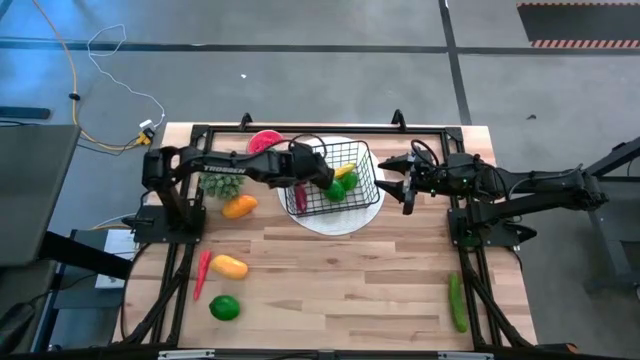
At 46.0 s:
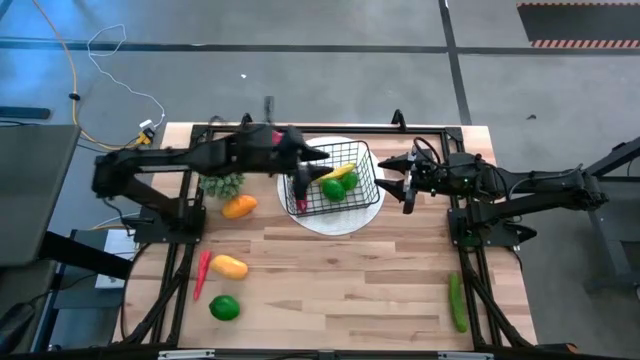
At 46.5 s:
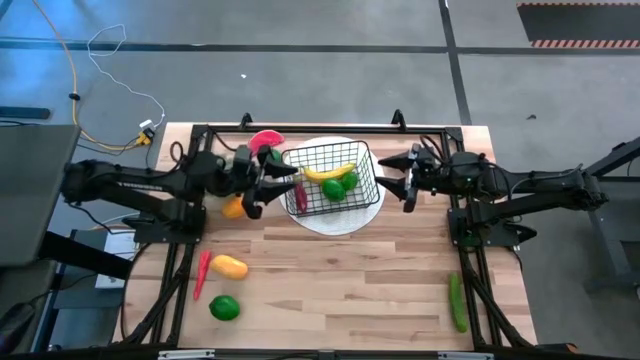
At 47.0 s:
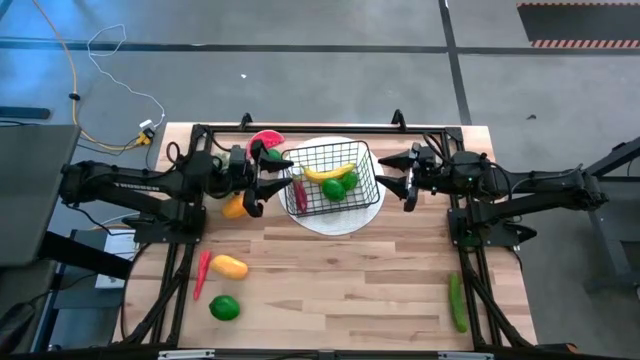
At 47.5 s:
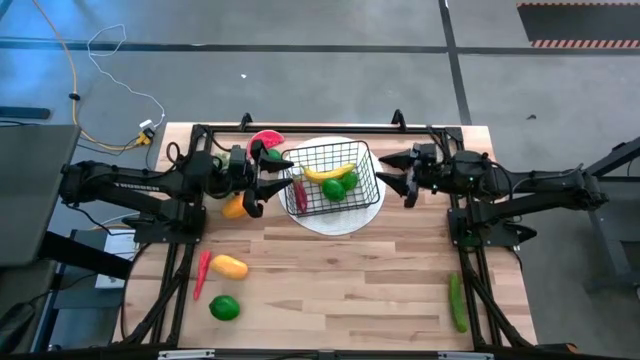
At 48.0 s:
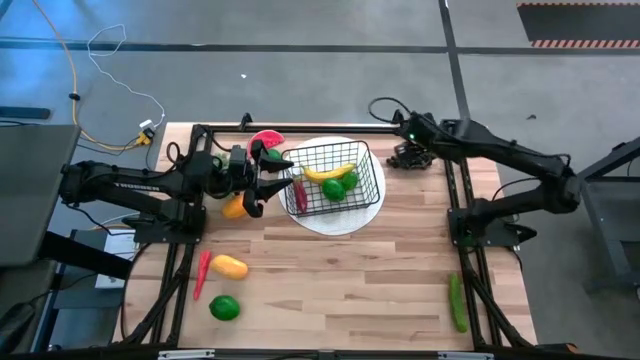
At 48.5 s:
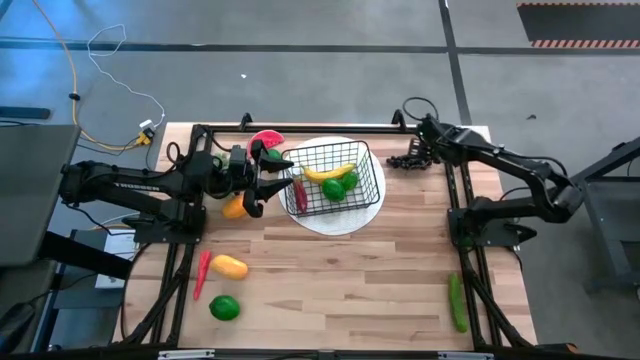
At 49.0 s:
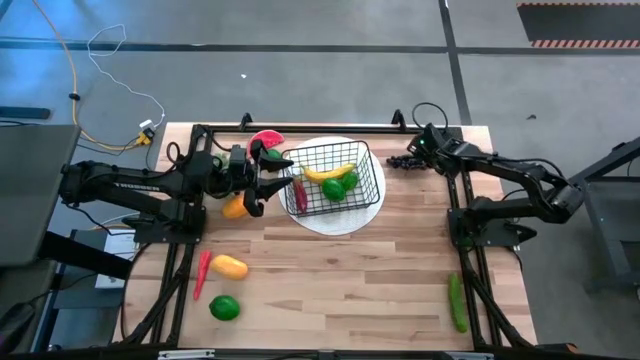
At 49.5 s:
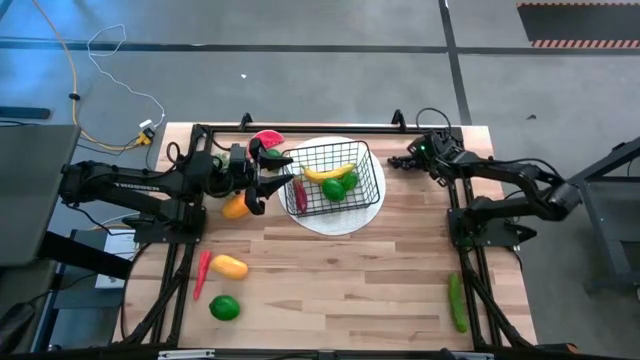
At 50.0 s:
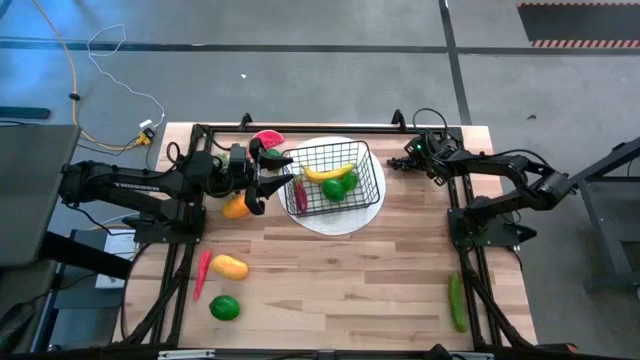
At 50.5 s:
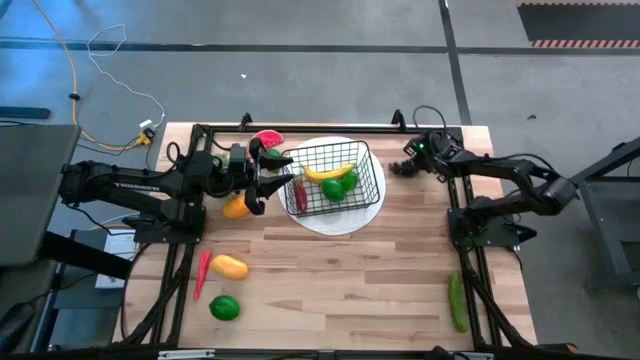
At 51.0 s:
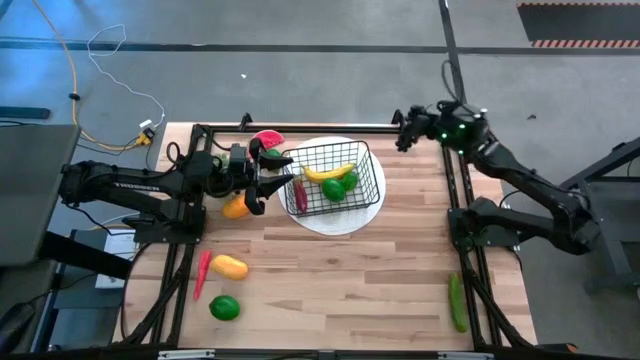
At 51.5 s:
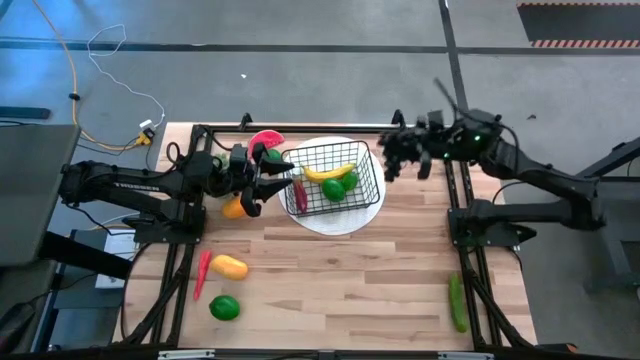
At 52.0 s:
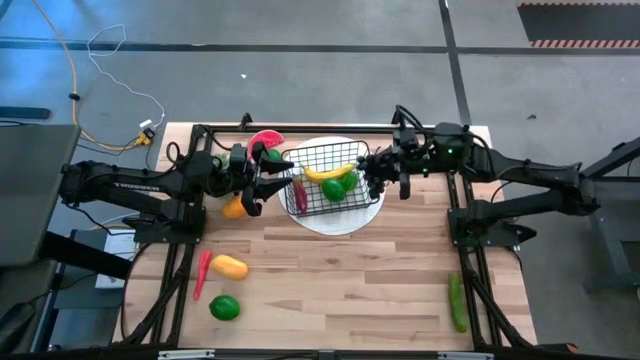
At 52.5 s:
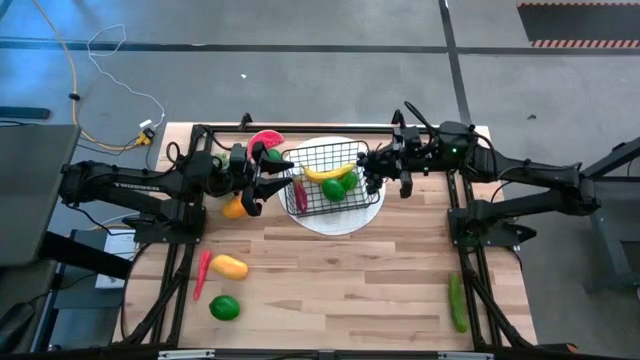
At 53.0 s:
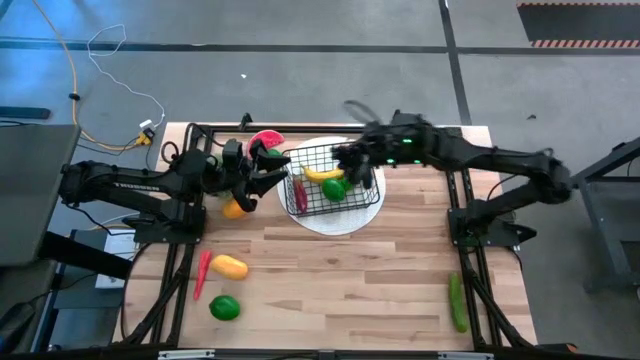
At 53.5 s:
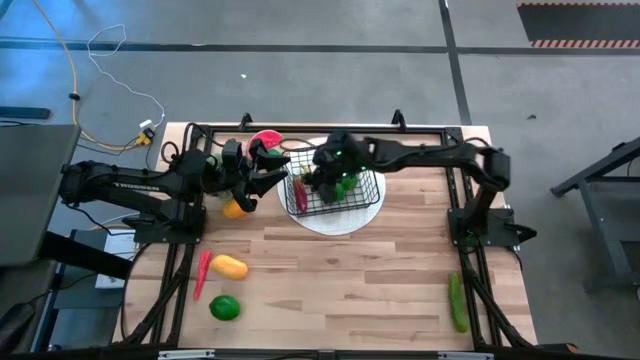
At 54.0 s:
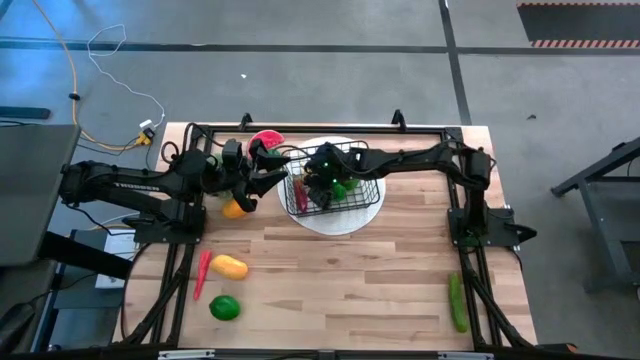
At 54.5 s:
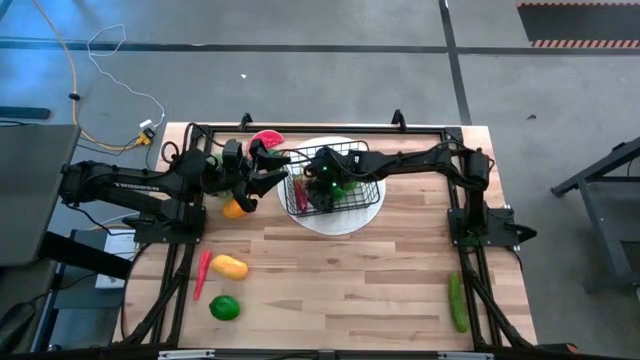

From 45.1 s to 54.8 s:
Task: Build produce basket
Put the black grapes into the black wire basket

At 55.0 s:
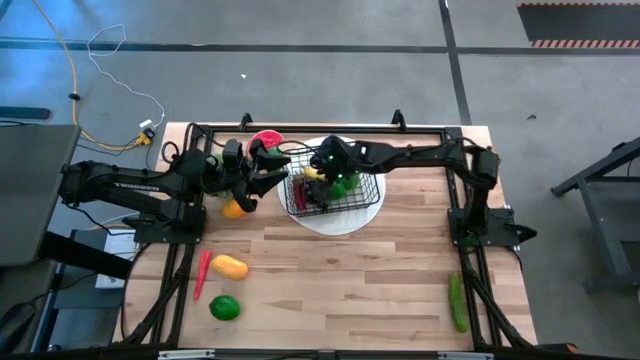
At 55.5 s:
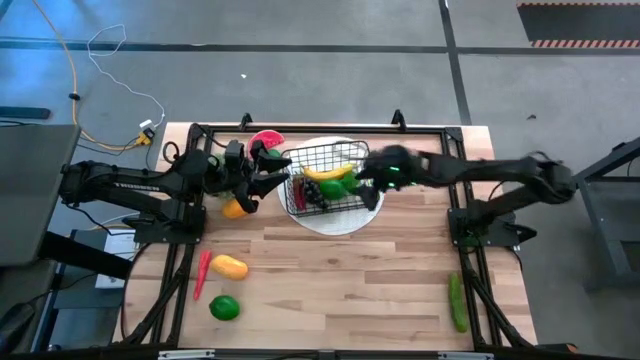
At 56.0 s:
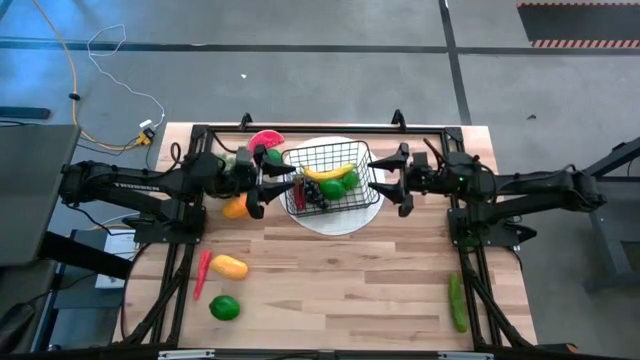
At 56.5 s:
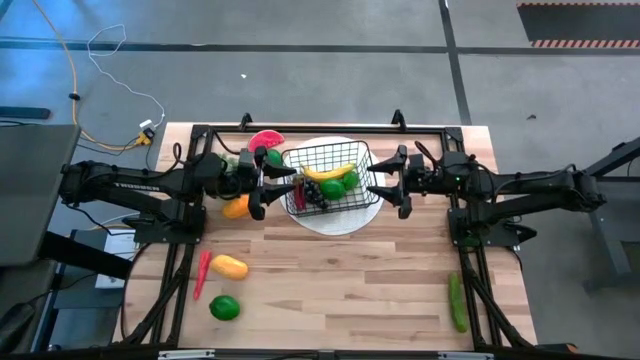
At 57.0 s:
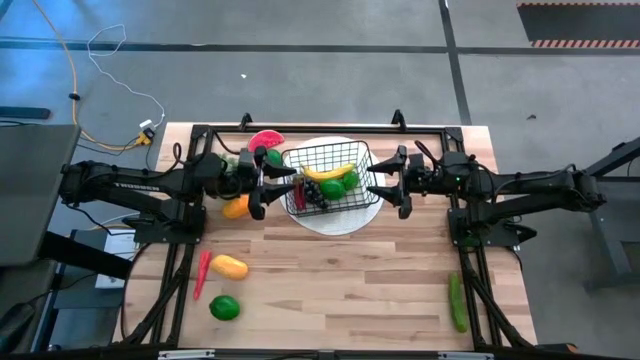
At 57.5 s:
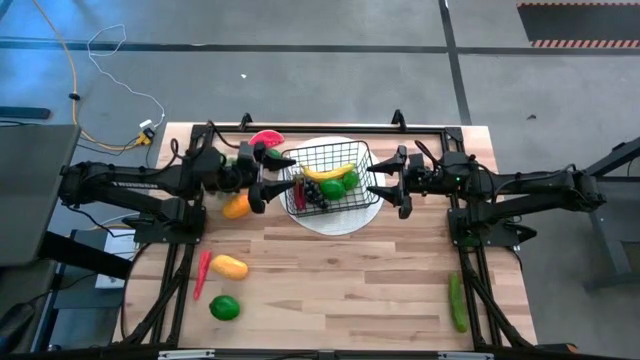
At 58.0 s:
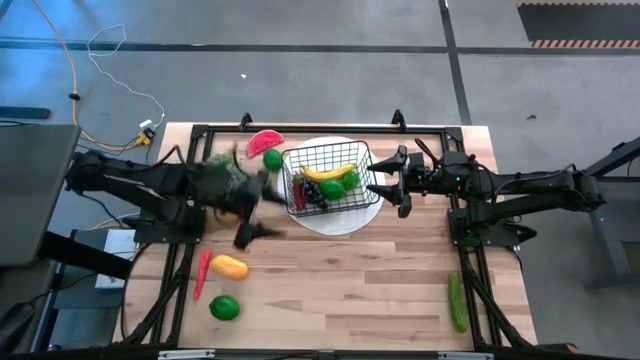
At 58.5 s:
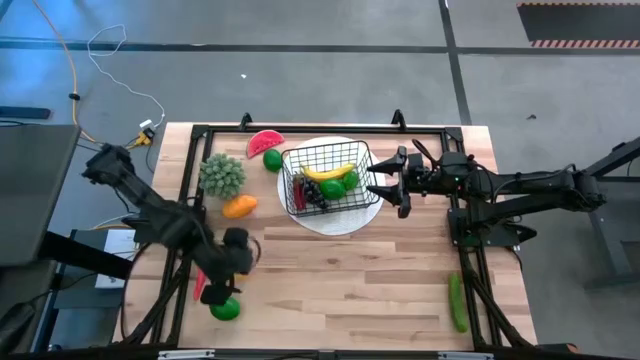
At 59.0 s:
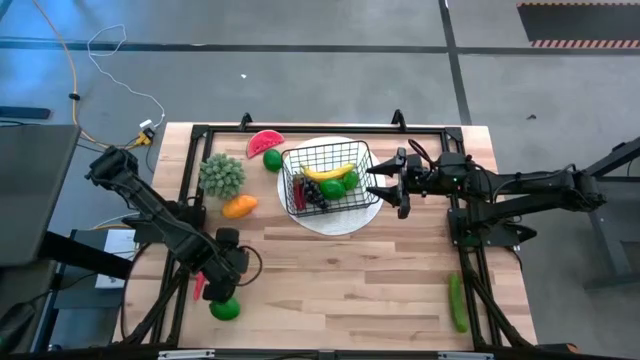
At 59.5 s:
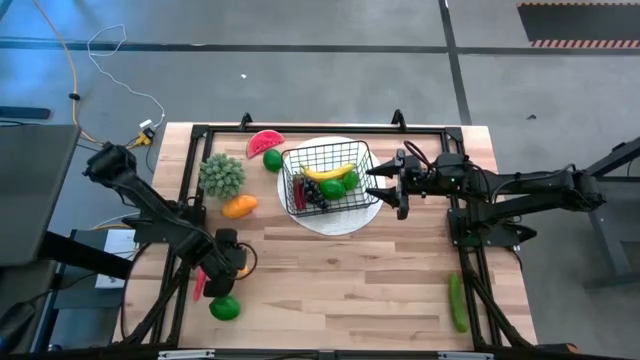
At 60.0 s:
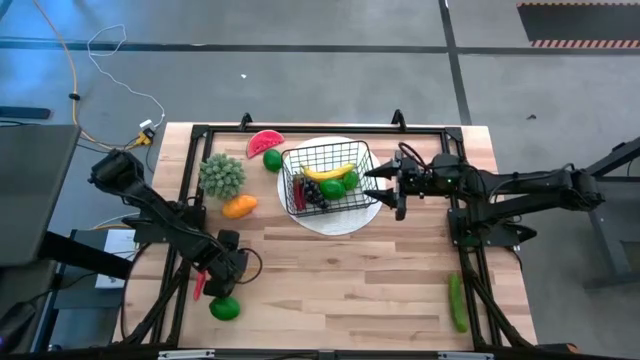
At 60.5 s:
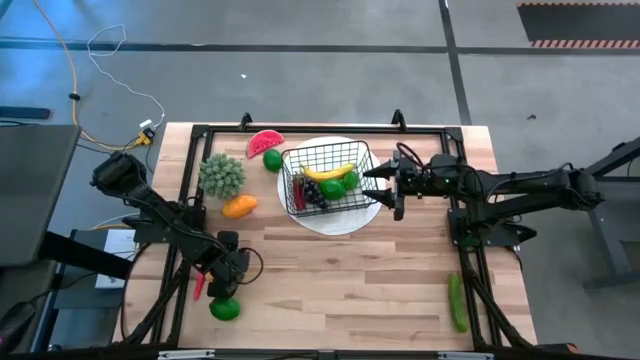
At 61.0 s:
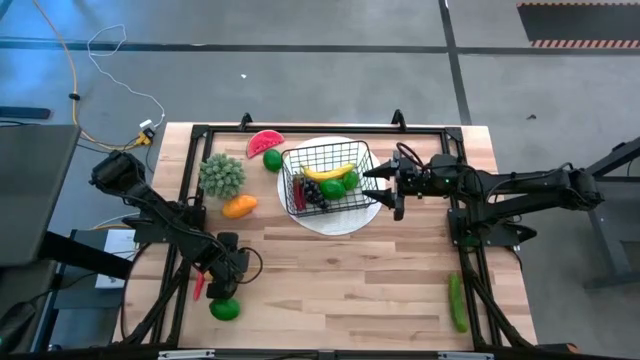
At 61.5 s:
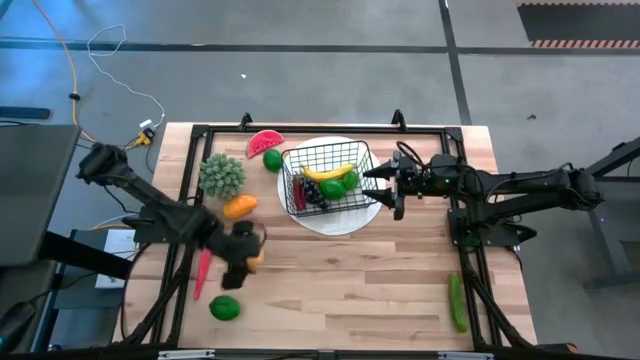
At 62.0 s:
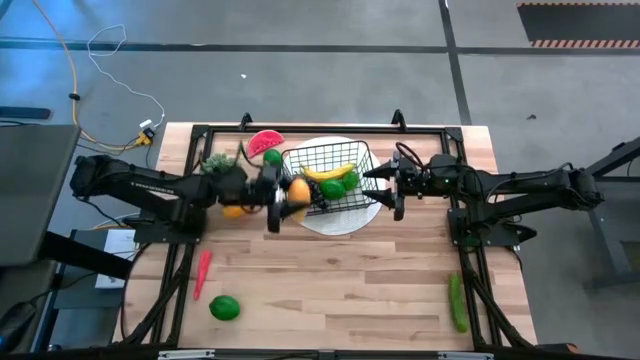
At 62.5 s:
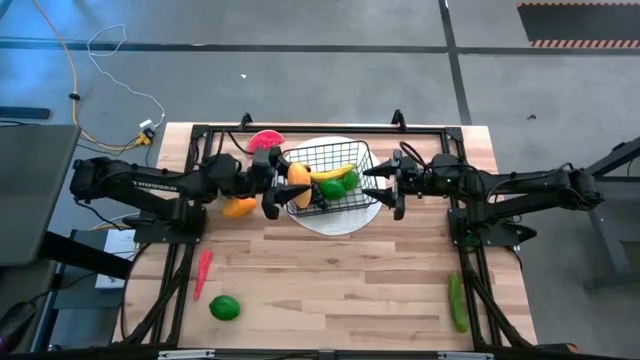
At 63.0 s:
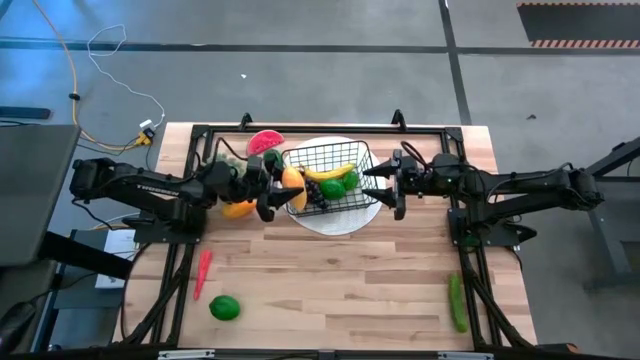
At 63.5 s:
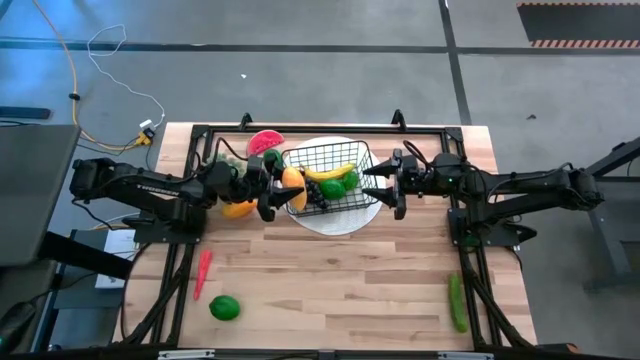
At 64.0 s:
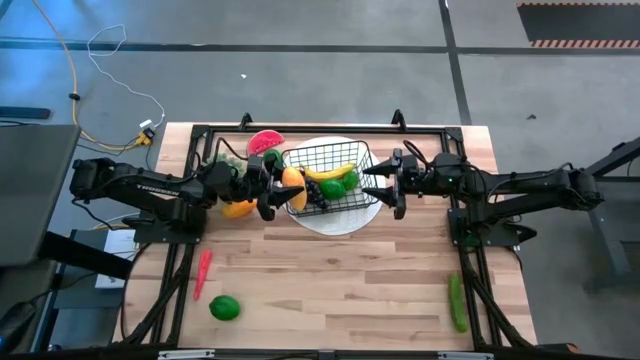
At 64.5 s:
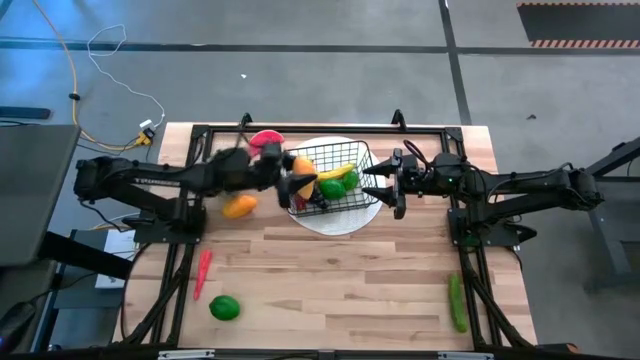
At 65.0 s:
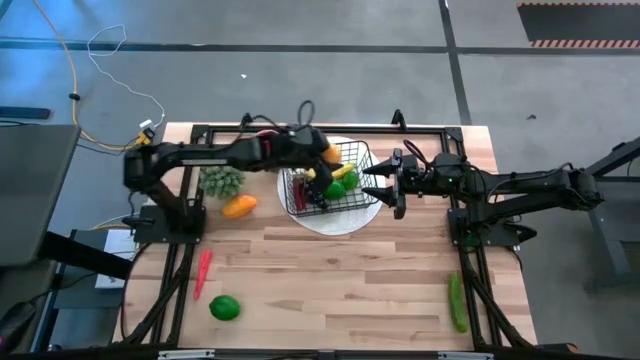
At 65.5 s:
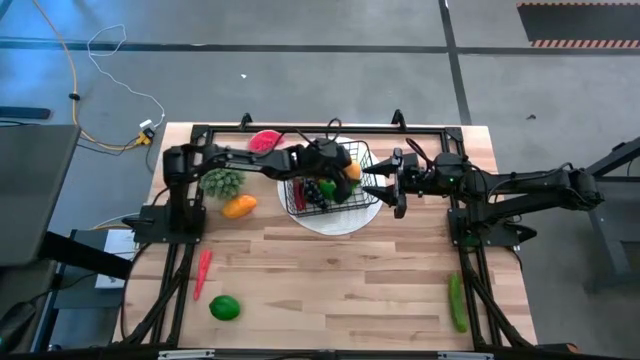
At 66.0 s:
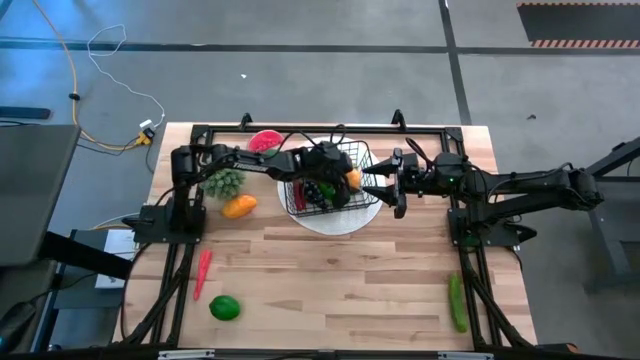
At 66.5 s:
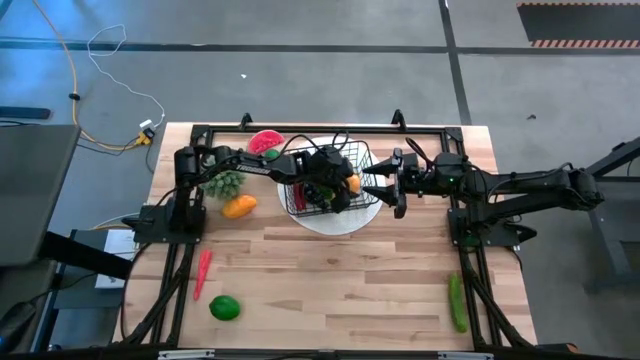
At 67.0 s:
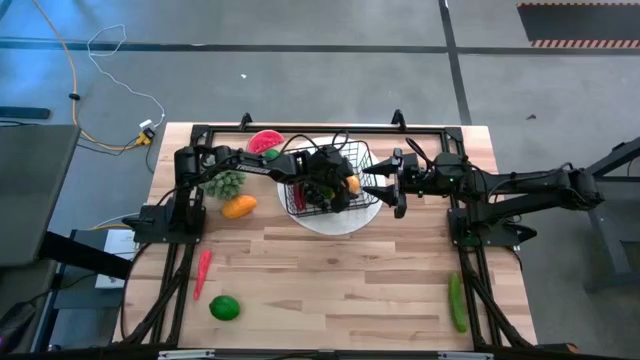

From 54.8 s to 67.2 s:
Put the bottom yellow mango into the black wire basket
